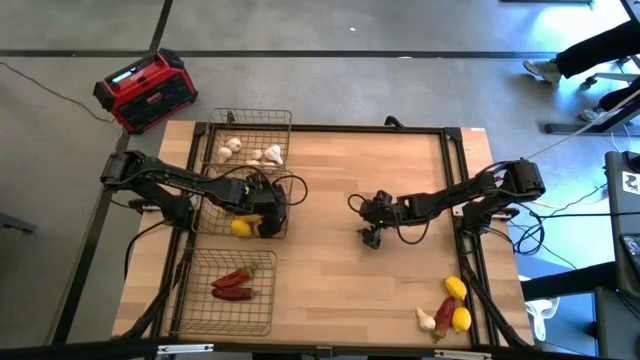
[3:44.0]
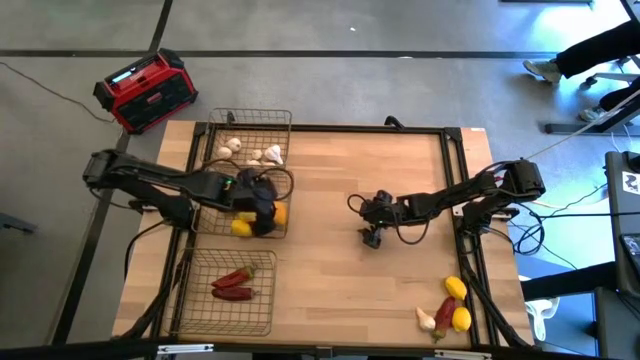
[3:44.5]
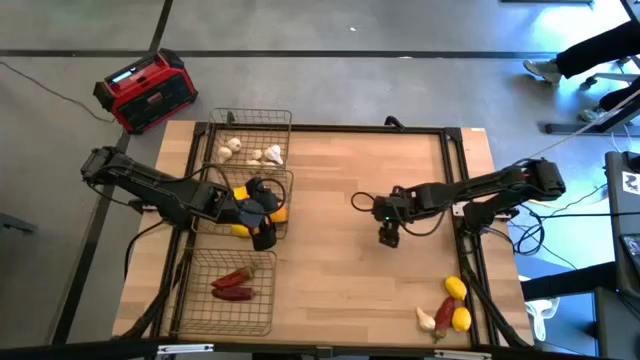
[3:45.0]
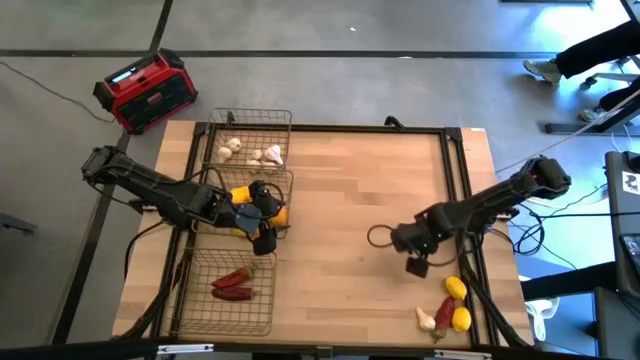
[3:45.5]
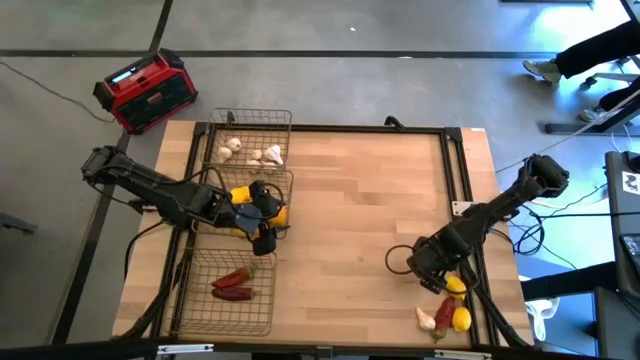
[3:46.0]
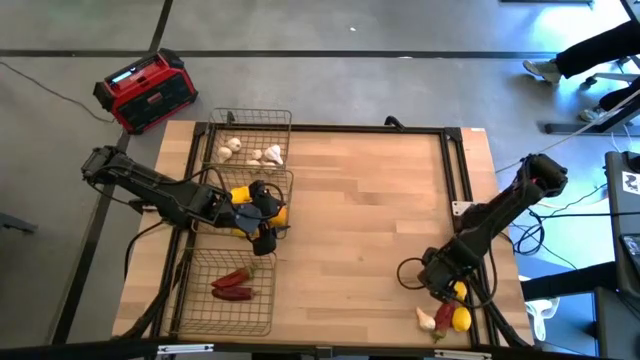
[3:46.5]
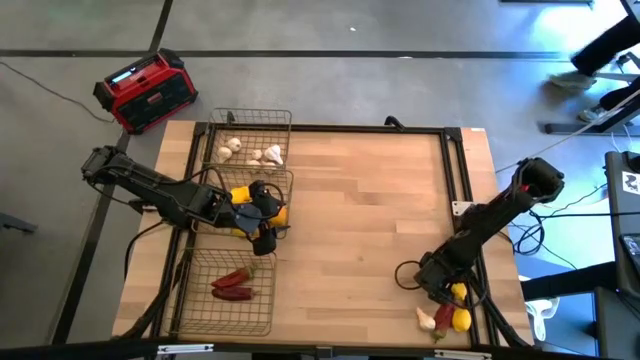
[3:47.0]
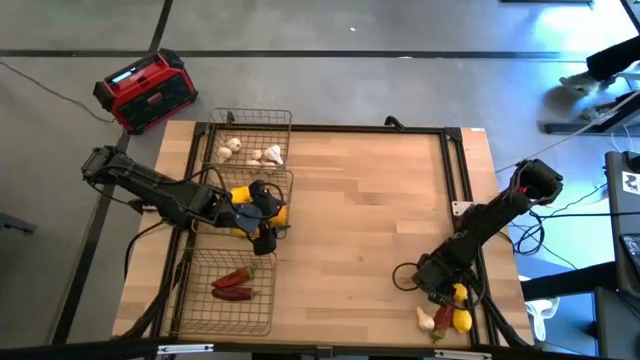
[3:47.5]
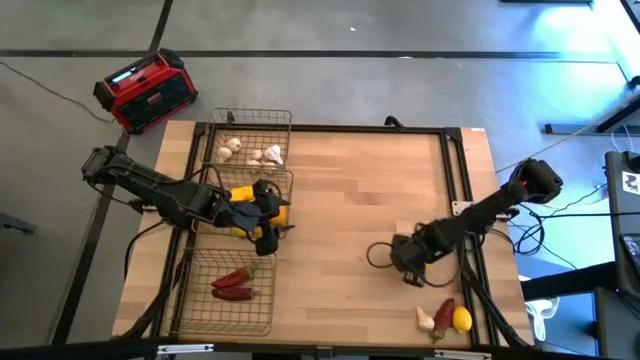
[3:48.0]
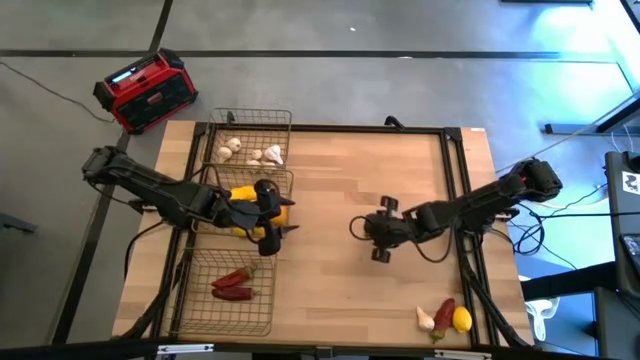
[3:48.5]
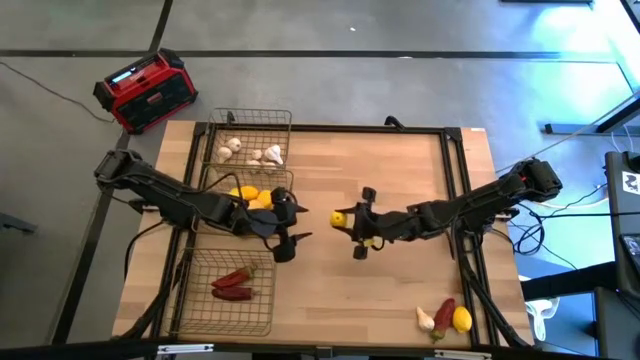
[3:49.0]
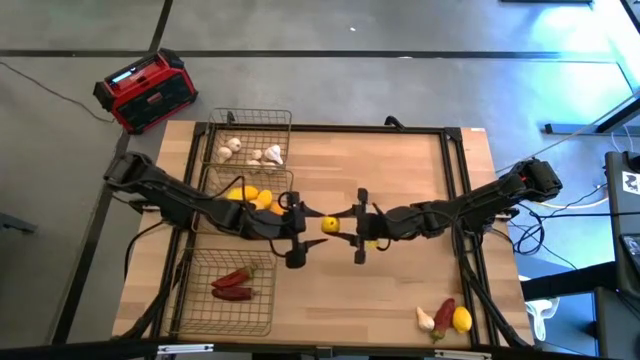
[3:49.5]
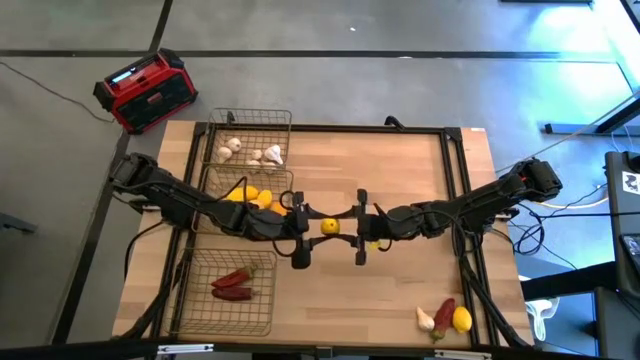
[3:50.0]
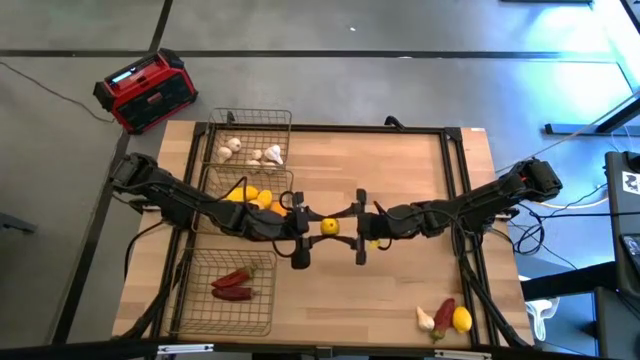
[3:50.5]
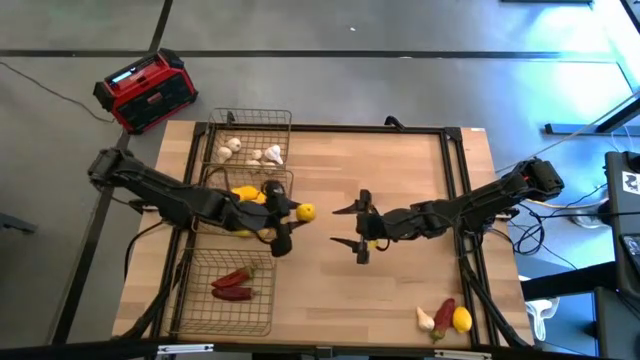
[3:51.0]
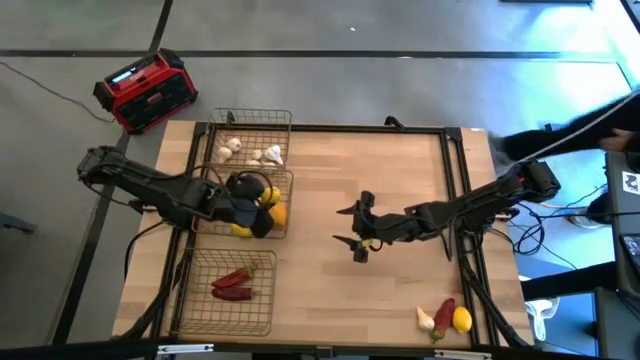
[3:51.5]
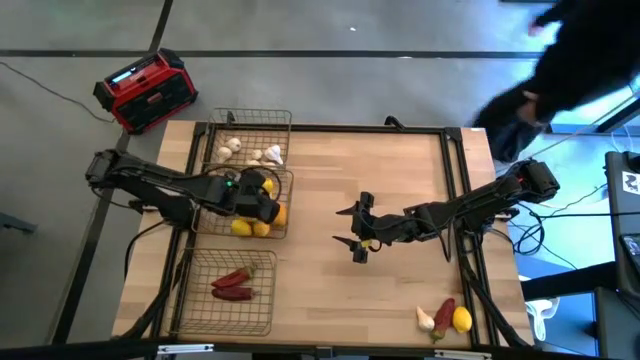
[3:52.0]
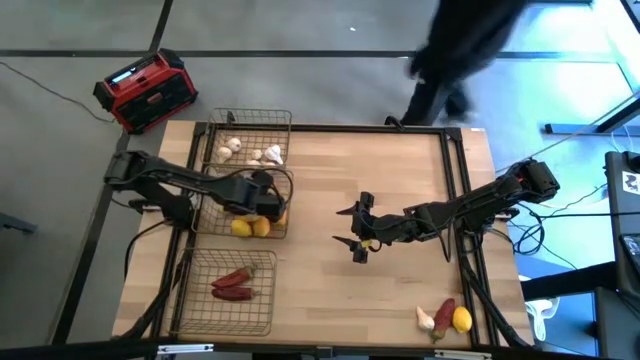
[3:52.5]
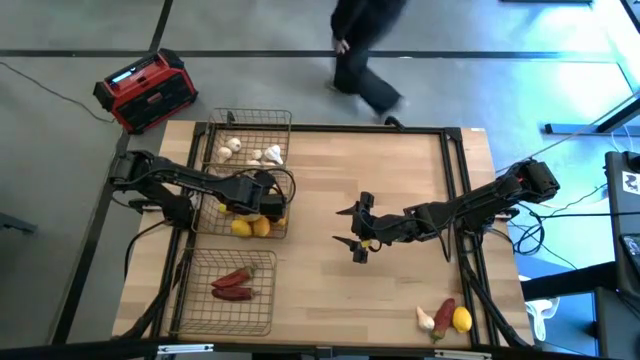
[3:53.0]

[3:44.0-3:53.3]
Task: Sort produce into baskets
Put the lemon in the middle wire basket

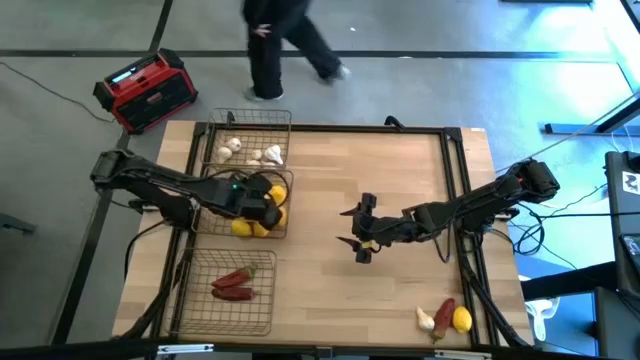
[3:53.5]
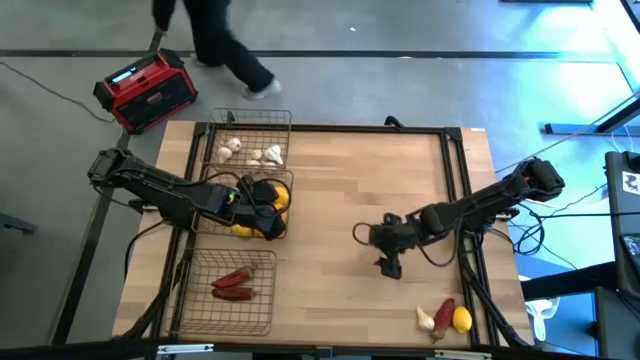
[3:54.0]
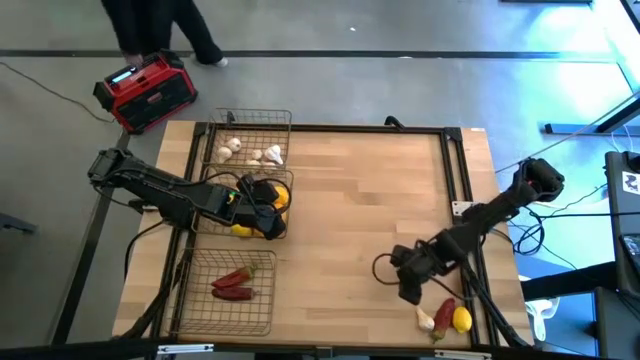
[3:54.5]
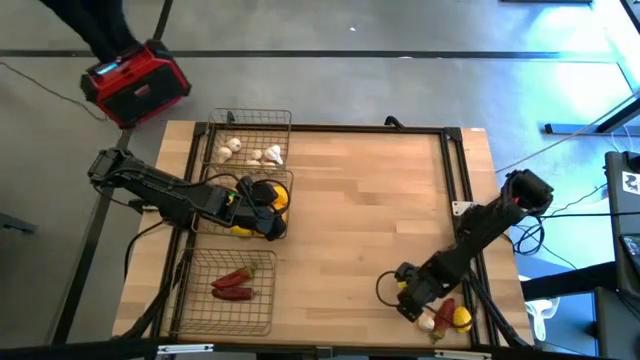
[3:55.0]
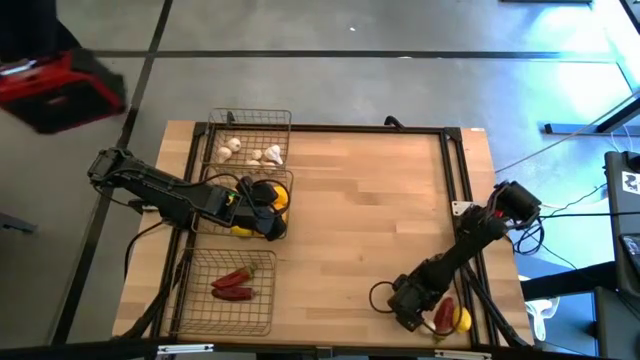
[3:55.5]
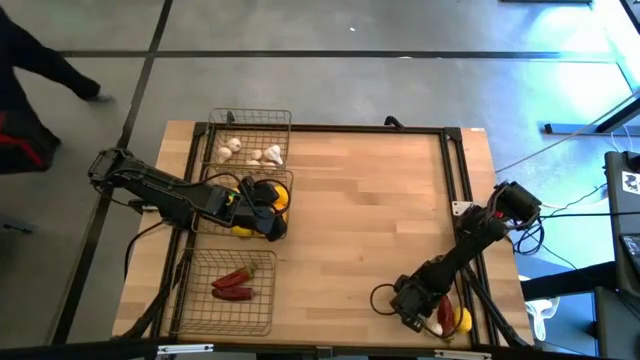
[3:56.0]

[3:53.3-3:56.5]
Put the garlic in the top wire basket

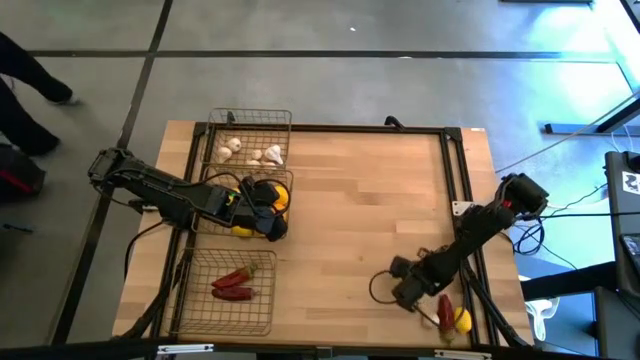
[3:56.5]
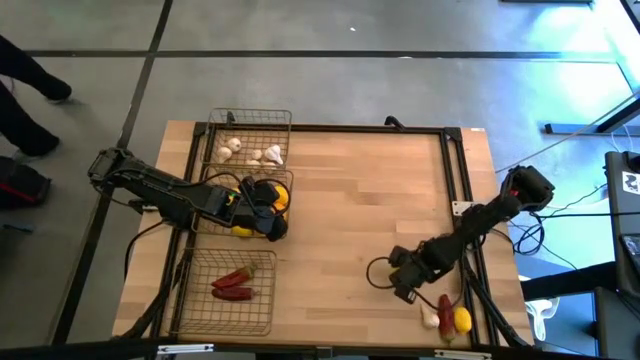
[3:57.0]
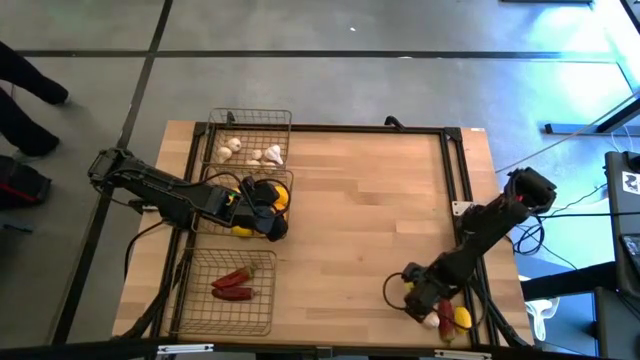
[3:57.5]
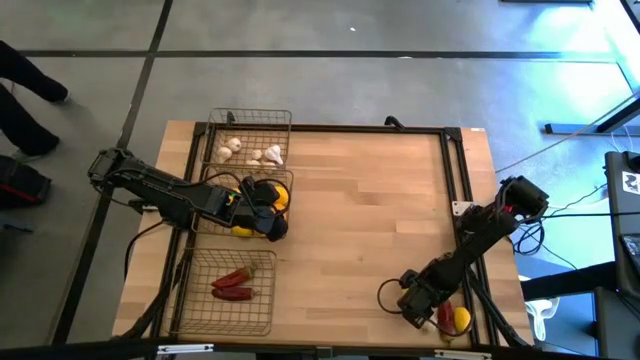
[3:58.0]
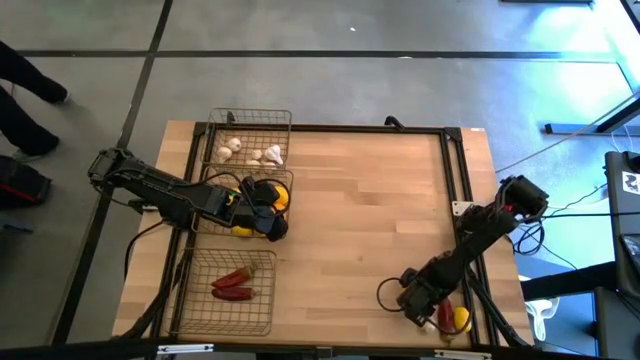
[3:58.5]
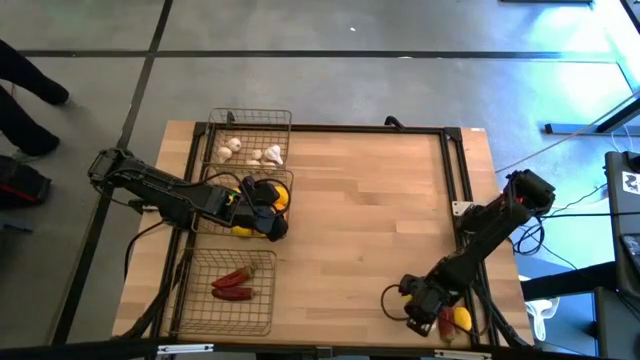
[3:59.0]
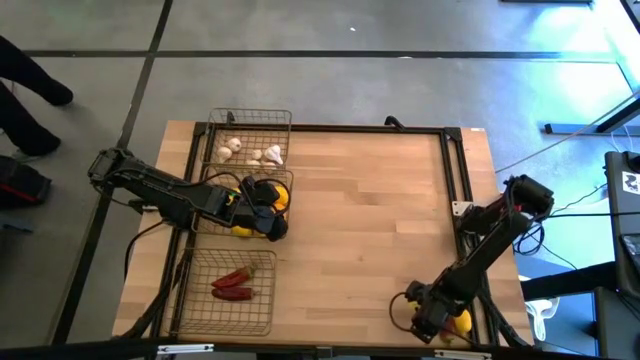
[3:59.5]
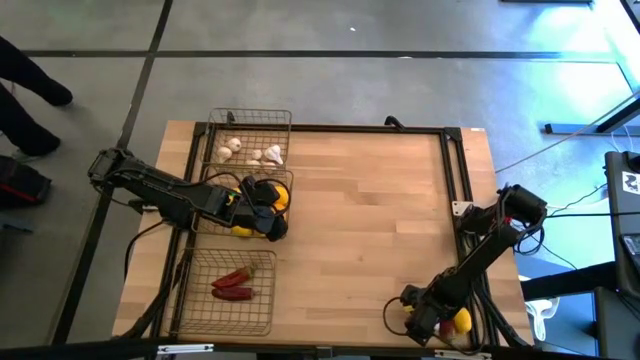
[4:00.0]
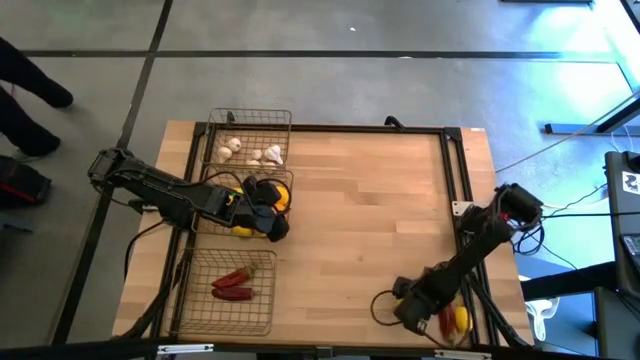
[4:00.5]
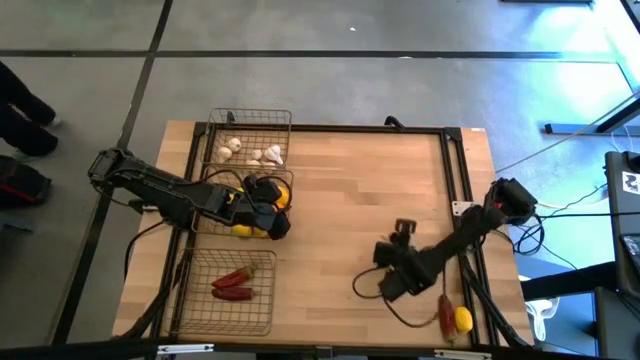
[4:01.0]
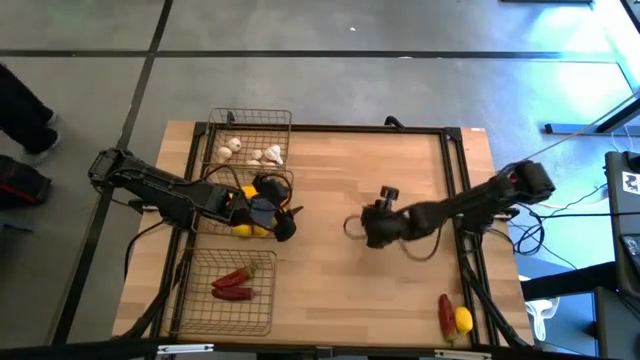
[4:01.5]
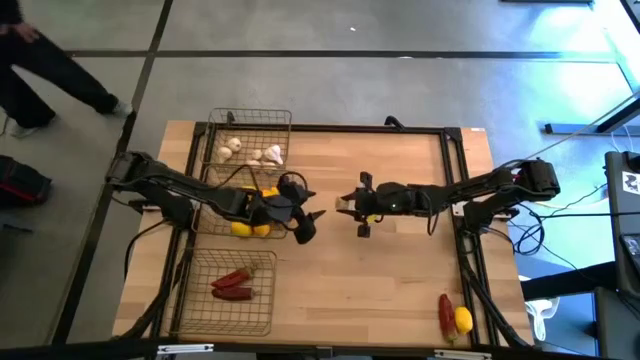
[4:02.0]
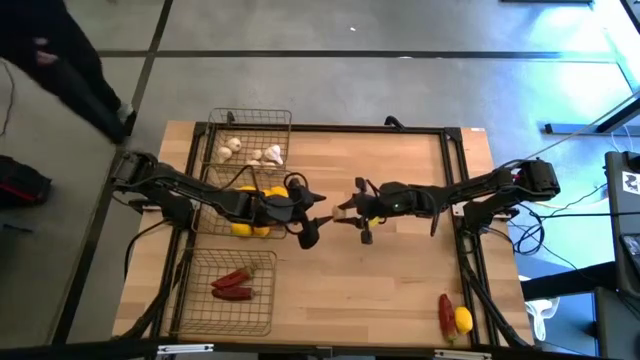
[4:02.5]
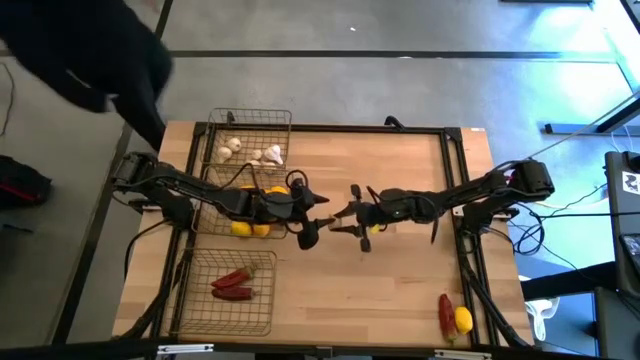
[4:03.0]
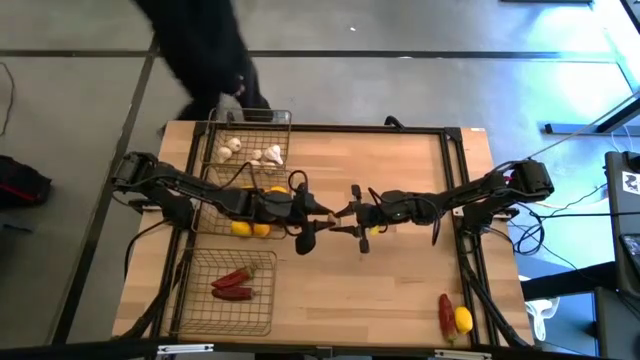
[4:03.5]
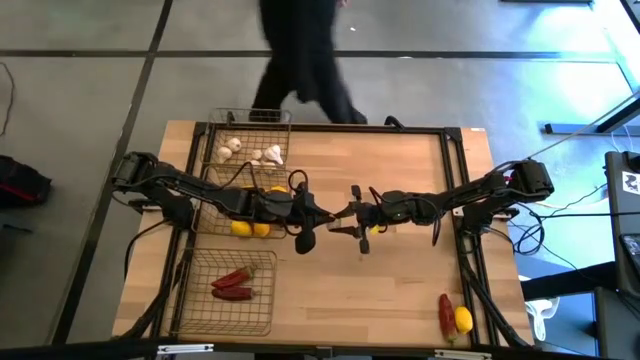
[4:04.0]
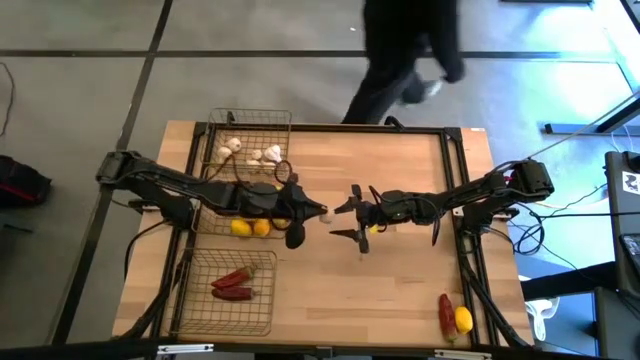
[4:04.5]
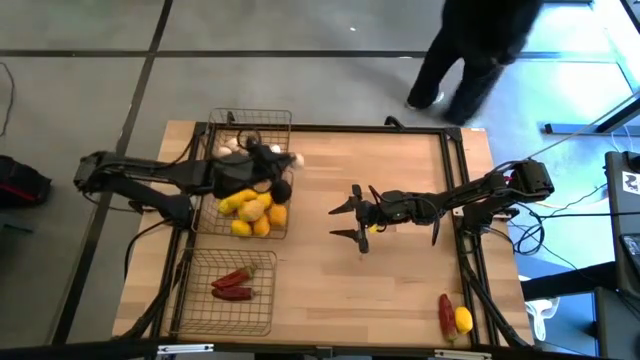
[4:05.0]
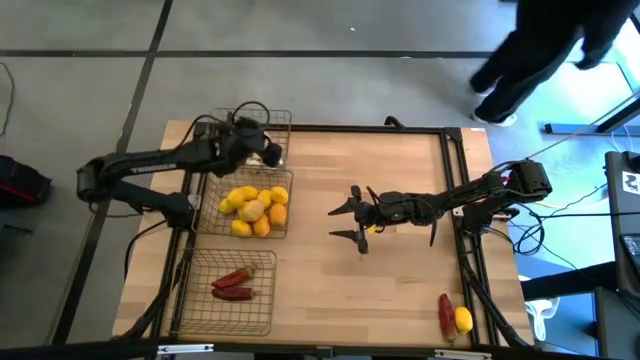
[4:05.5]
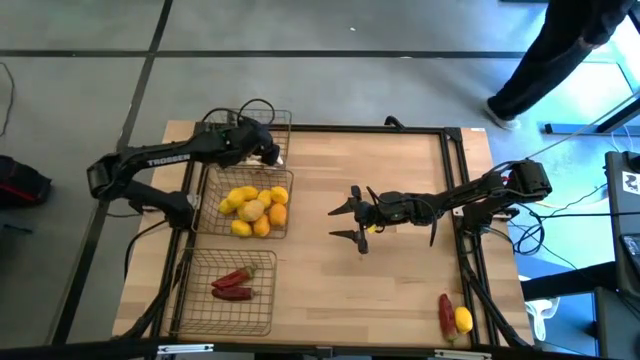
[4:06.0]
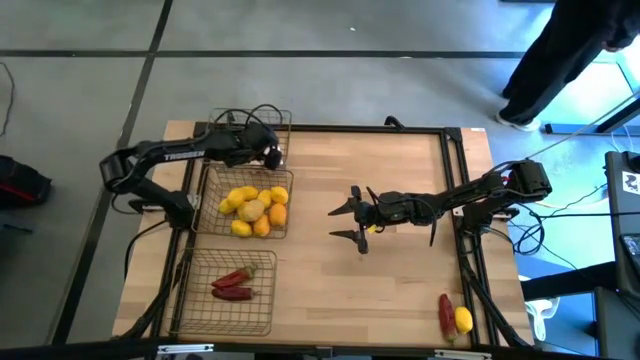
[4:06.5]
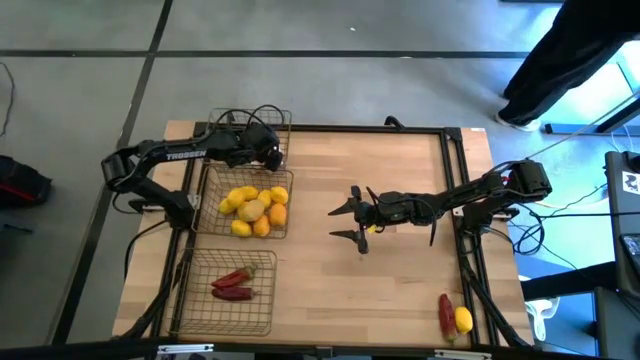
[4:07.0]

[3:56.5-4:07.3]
Put the garlic in the top wire basket
